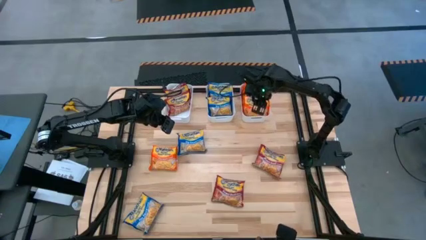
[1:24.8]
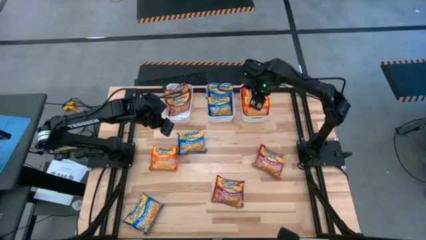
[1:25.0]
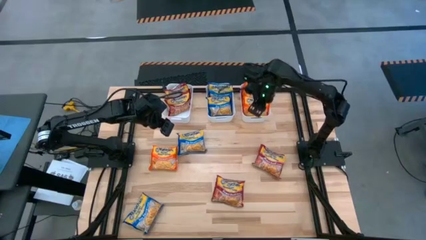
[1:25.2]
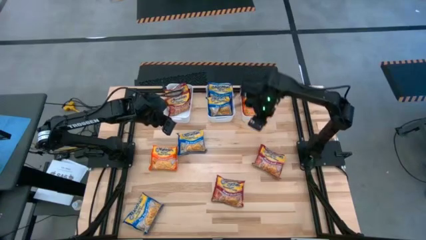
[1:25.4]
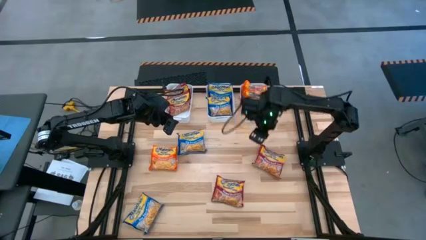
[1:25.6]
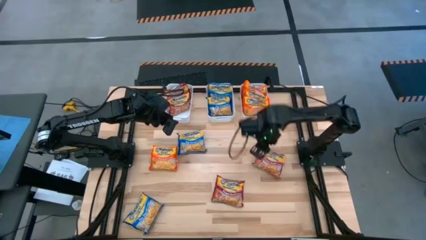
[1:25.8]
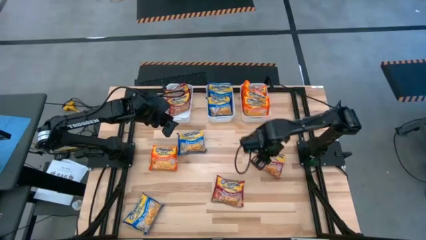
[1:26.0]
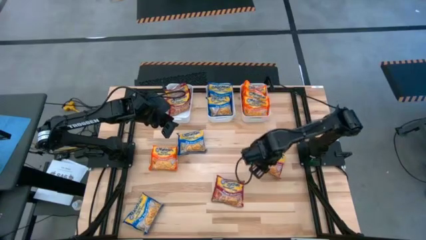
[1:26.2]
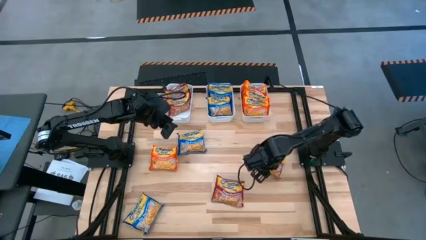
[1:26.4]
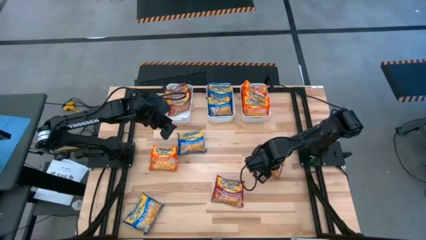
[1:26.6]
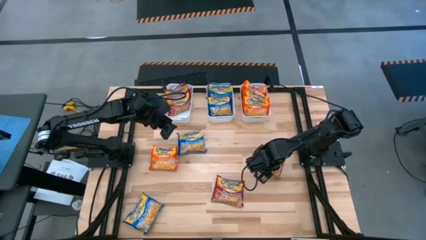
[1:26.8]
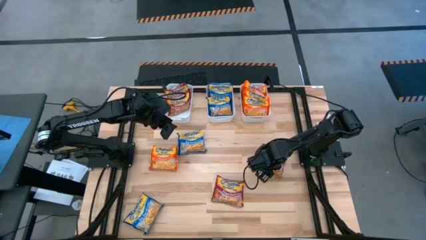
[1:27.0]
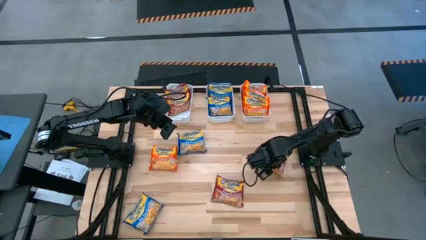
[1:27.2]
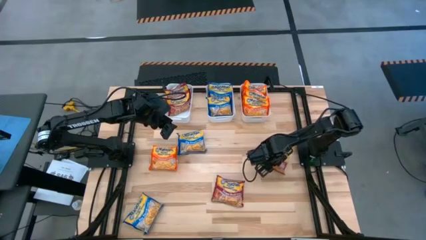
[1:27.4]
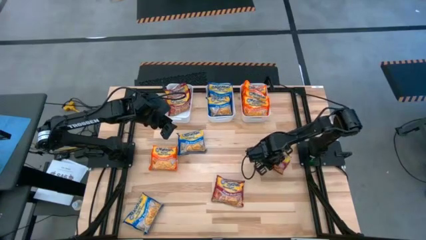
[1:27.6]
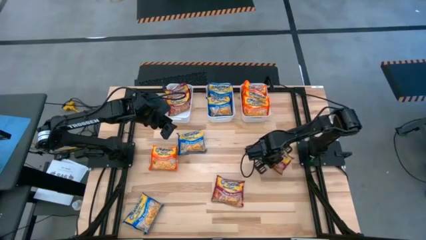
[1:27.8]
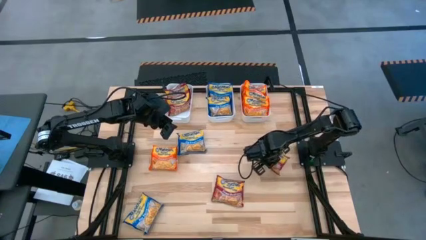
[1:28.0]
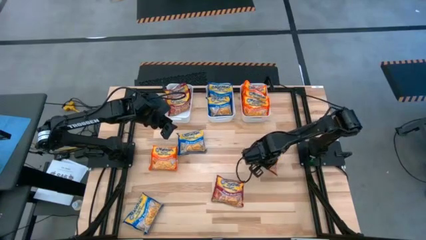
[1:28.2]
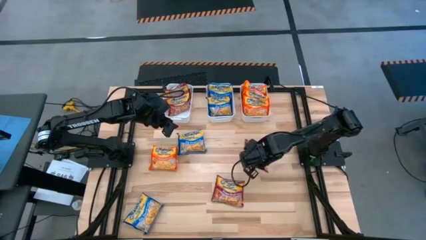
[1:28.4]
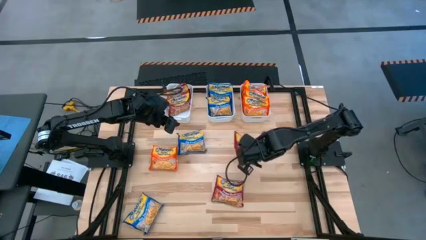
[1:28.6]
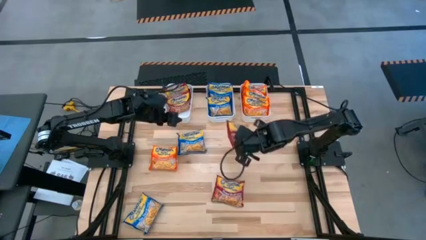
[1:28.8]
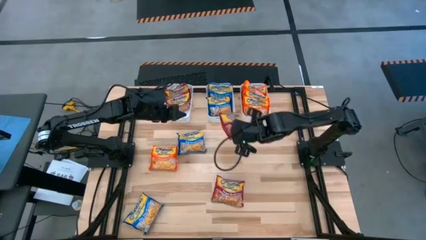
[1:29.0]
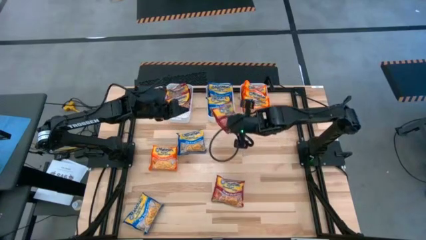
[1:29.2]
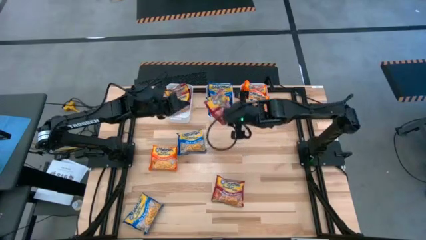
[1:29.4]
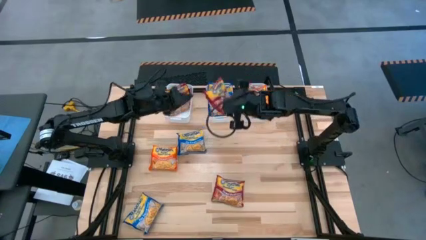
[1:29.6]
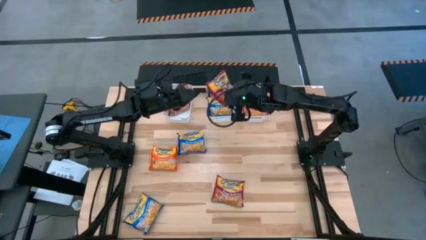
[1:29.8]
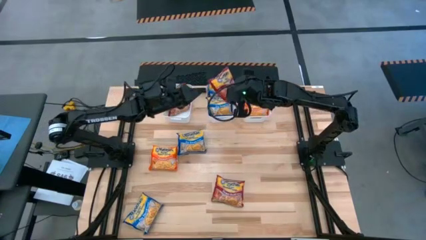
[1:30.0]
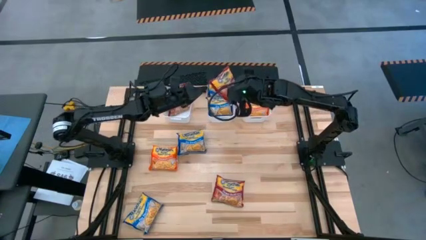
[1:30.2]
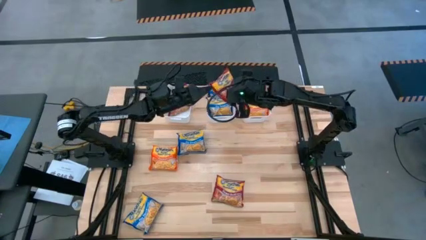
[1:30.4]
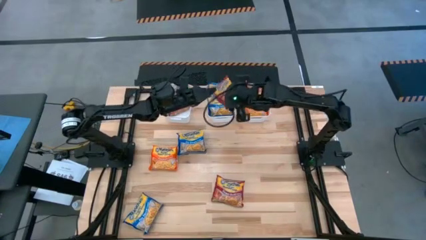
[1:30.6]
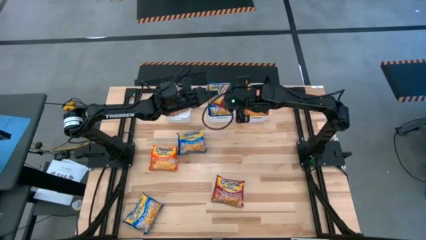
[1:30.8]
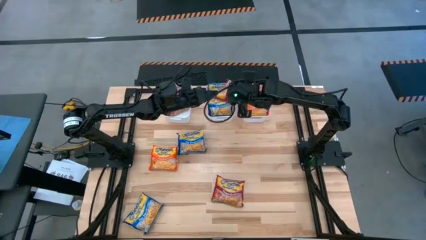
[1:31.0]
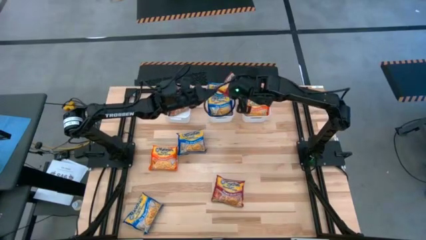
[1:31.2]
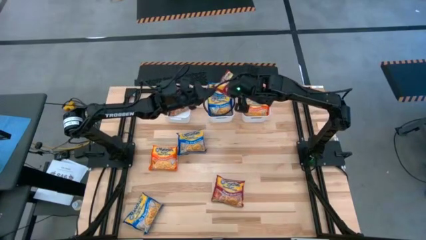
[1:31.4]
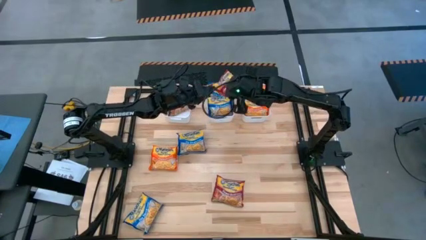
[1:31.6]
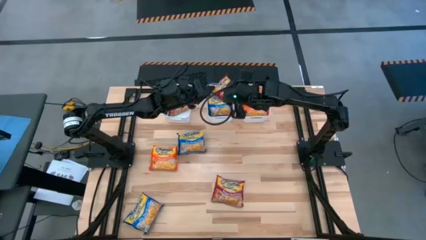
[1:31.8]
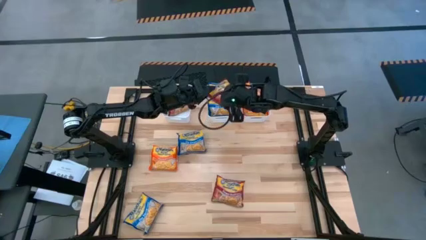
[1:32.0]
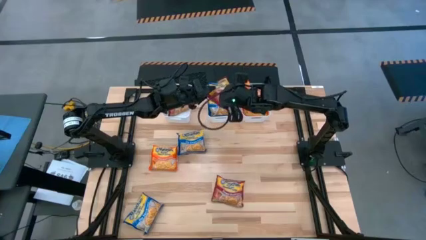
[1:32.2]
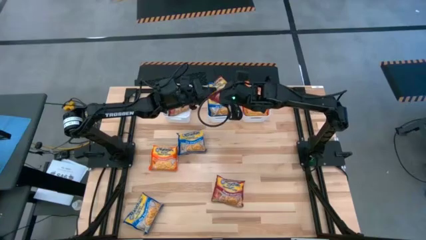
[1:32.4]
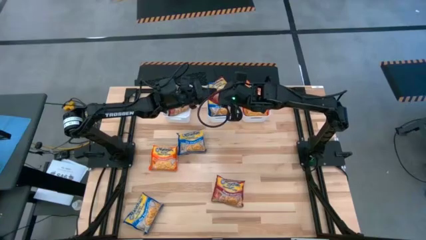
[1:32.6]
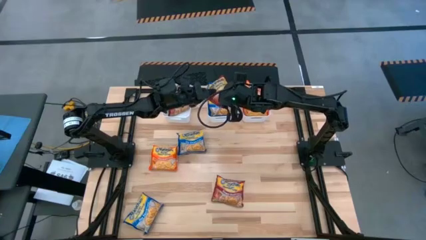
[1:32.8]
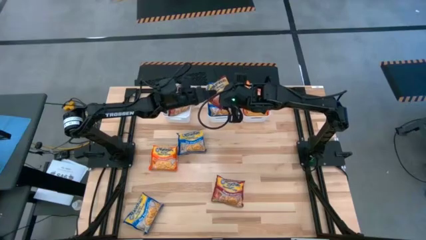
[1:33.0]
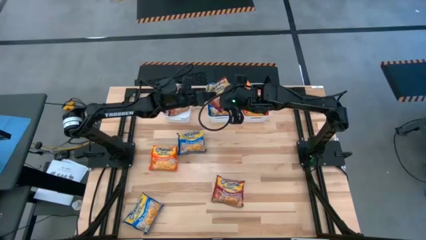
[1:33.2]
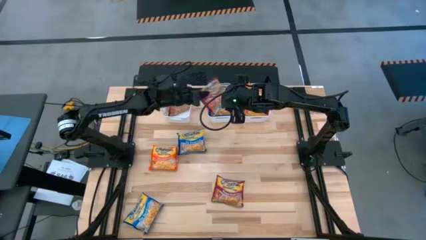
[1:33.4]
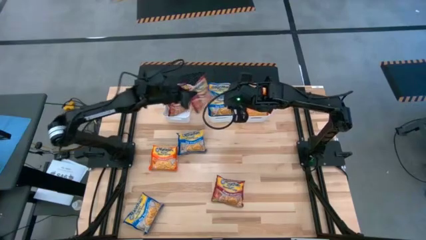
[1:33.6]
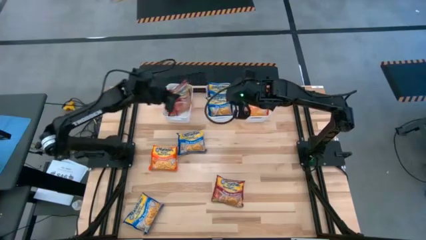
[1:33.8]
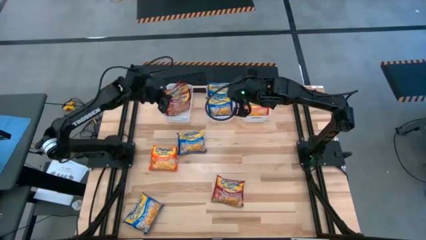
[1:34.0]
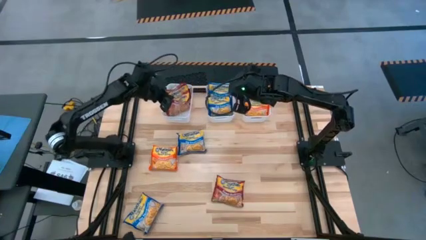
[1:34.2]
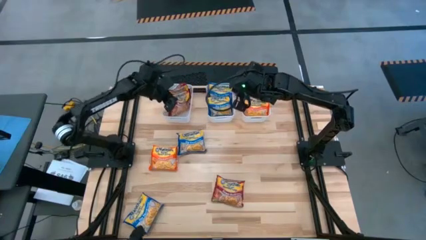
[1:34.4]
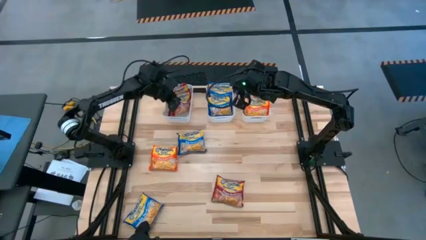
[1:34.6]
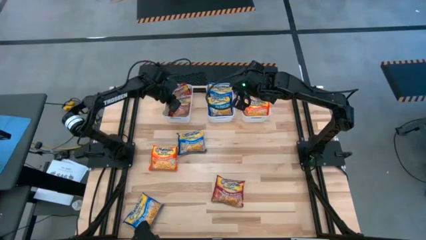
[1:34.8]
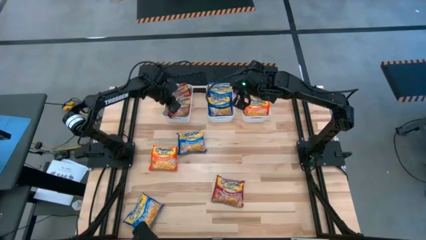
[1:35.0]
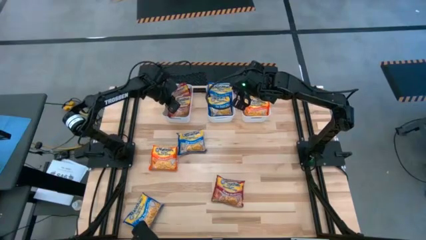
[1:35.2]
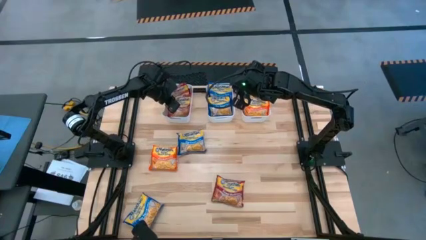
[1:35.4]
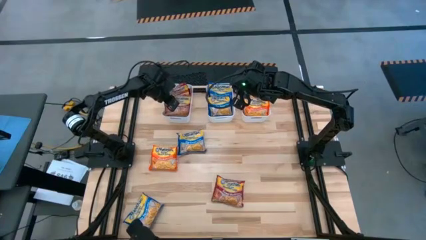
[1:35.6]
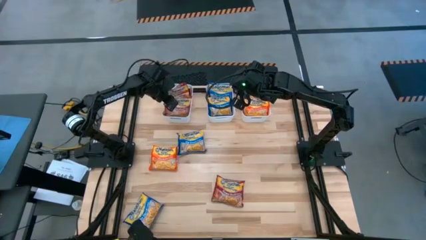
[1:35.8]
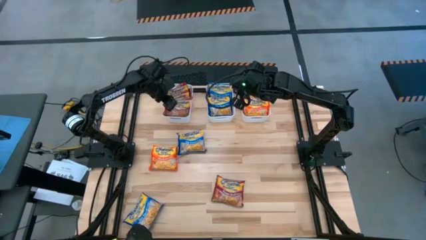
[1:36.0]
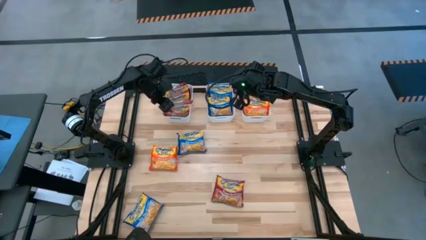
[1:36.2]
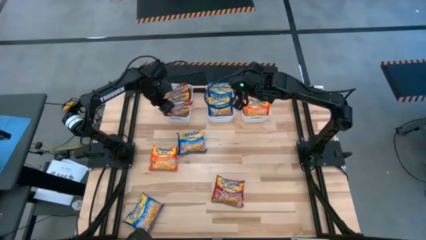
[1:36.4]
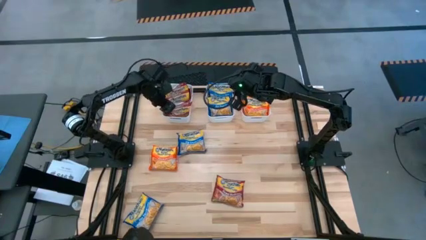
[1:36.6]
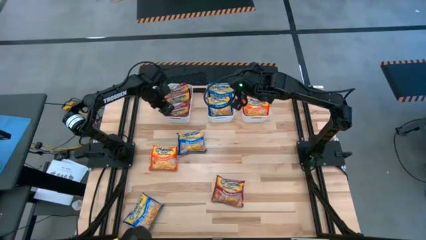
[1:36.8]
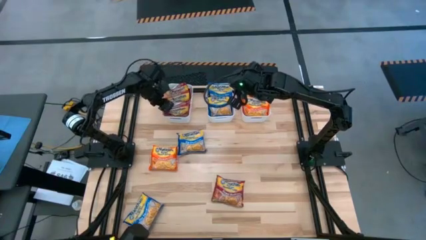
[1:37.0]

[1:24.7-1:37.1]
Task: Sort Maruchan noodles
Put the top red noodle pack into the top left white bin

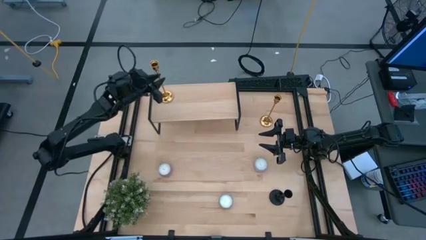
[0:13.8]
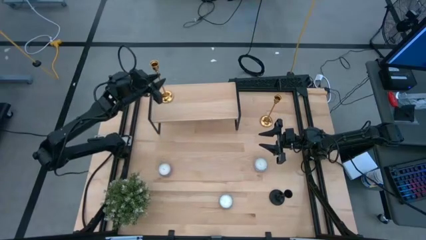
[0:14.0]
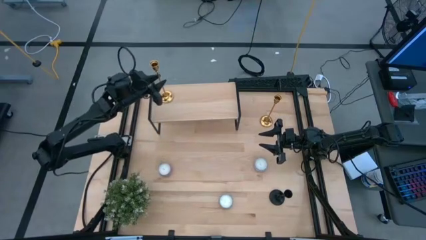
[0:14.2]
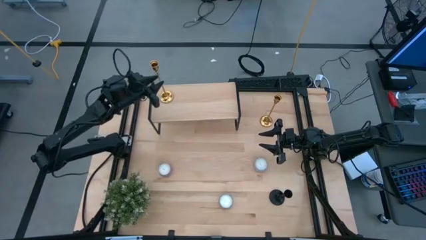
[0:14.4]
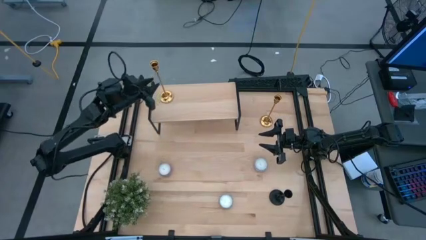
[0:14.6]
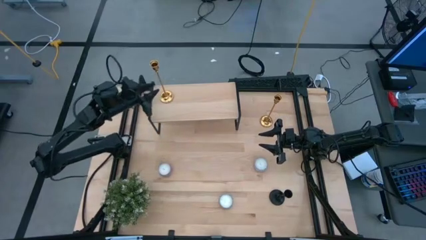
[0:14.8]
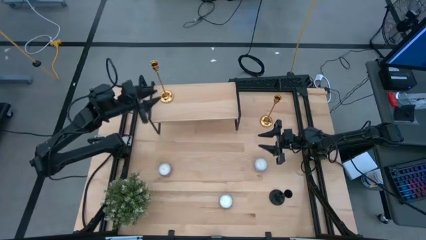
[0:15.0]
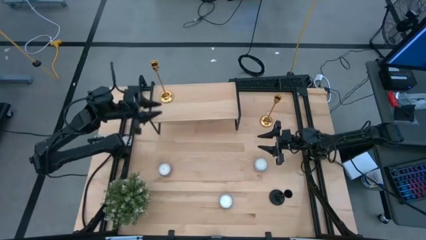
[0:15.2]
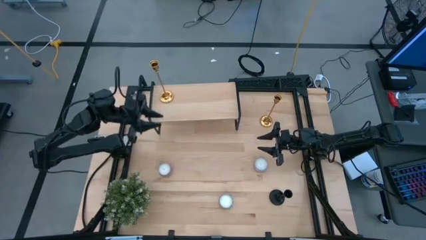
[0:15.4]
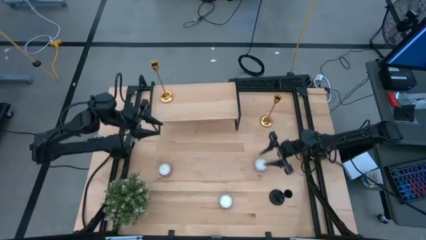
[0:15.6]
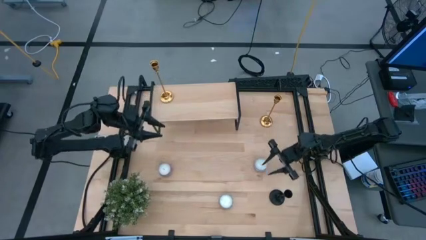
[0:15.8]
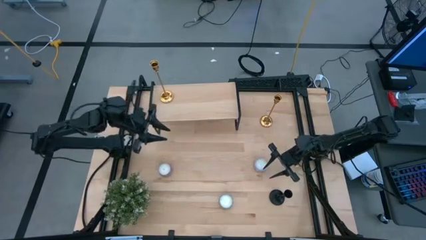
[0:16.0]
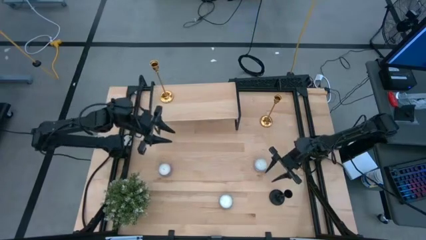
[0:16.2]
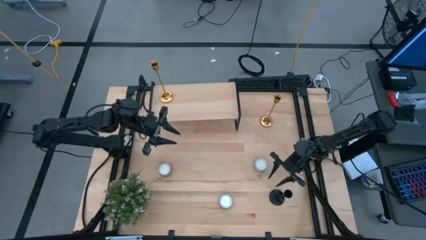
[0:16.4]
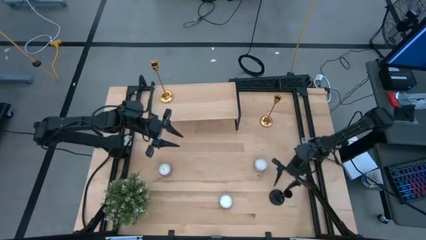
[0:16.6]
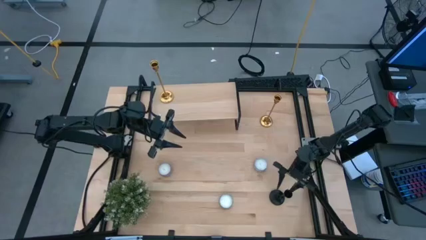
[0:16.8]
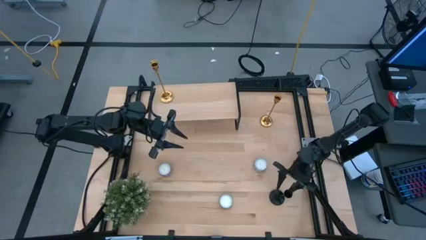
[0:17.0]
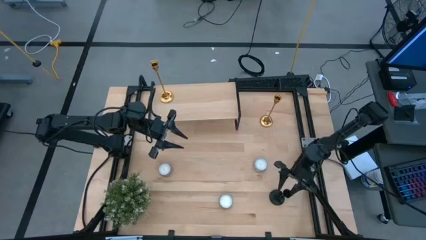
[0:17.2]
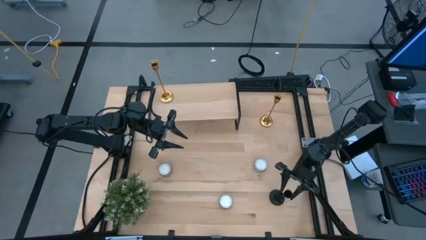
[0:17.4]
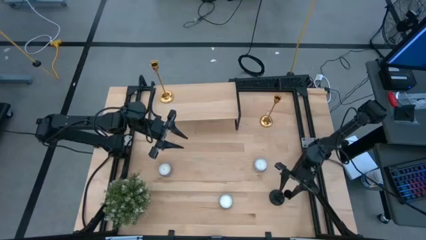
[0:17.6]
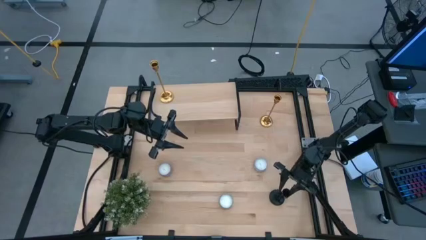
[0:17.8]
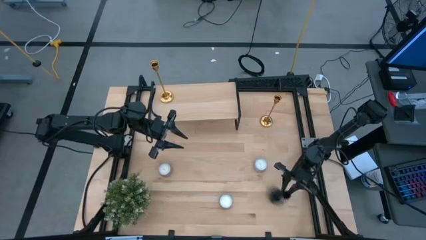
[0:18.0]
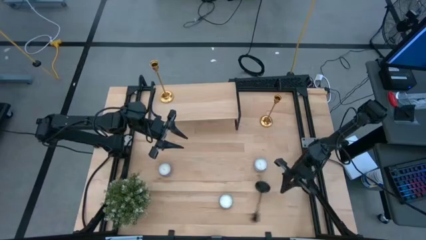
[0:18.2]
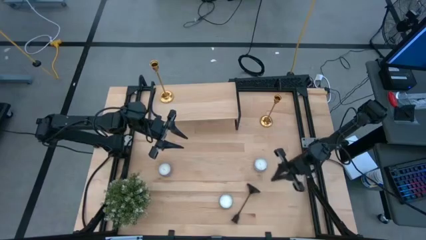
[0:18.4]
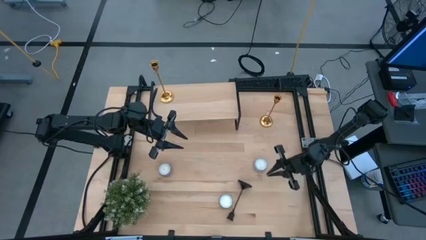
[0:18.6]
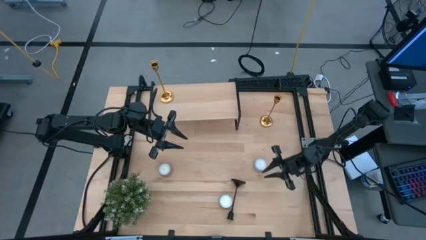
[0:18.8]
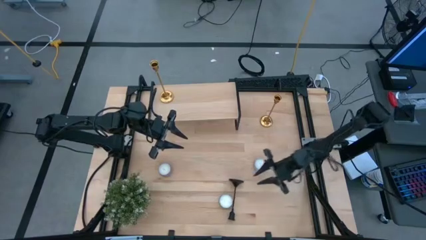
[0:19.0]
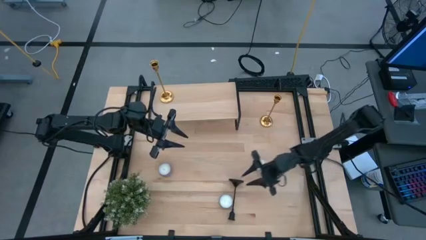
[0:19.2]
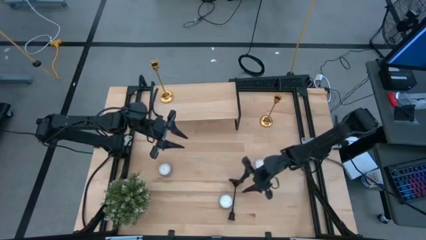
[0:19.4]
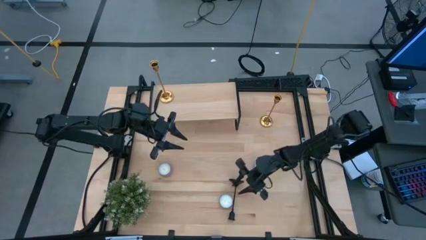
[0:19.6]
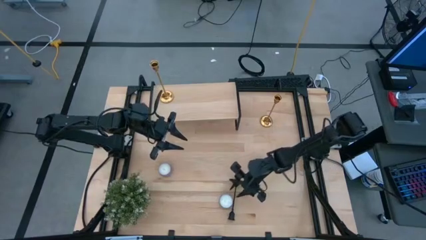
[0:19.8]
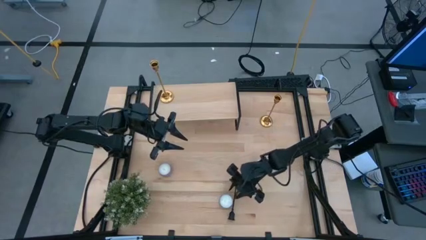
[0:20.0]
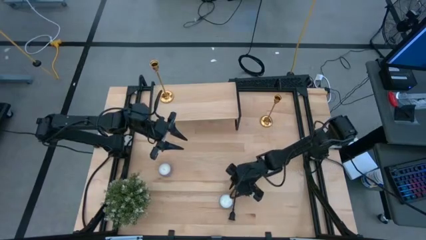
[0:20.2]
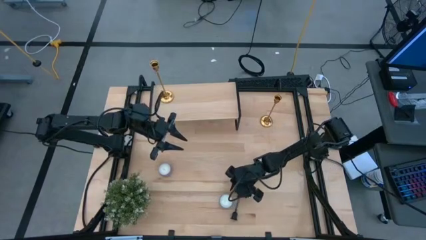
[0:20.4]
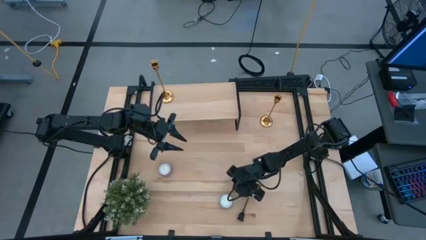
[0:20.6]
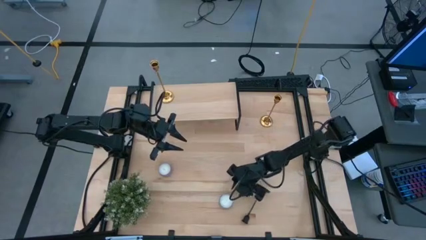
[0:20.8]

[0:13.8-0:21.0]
Task: Pick & Place candle stick holders
Put the black candle holder on the shelf aligned with the other candle holder
